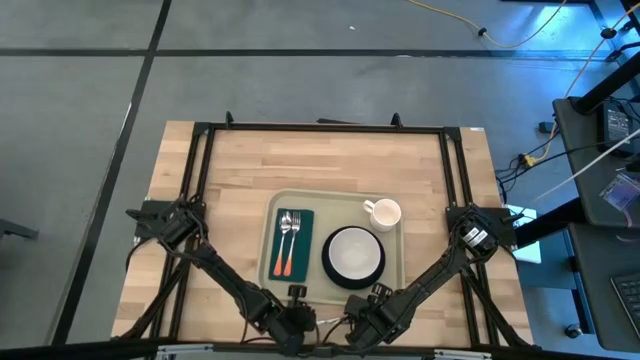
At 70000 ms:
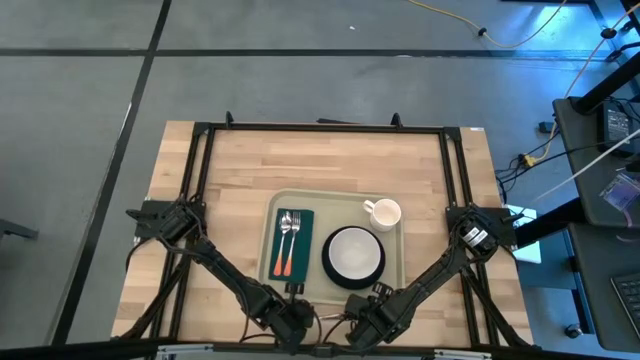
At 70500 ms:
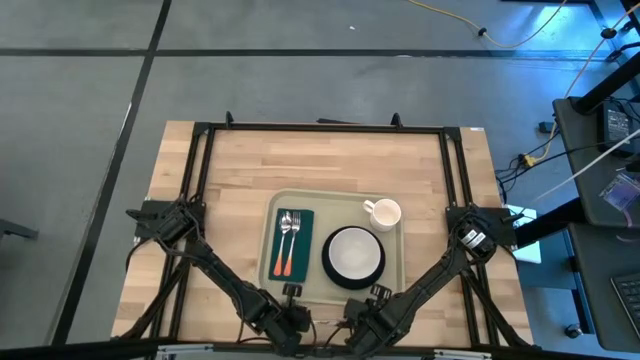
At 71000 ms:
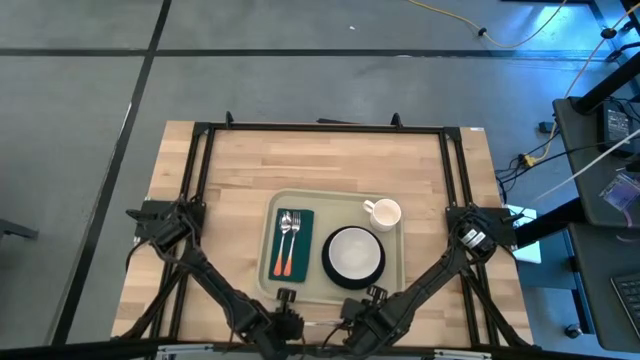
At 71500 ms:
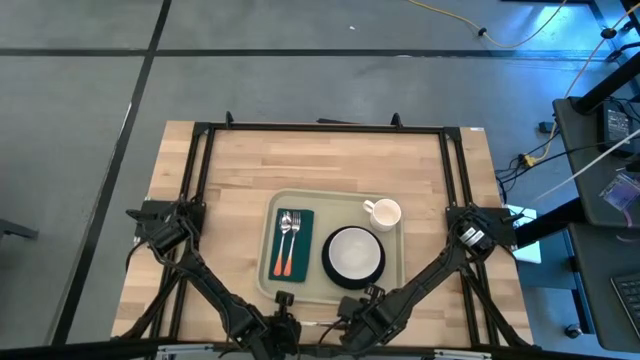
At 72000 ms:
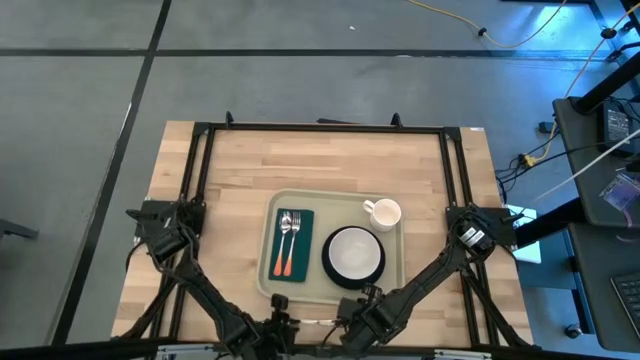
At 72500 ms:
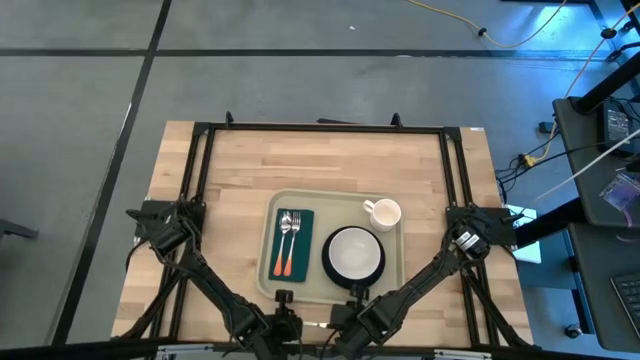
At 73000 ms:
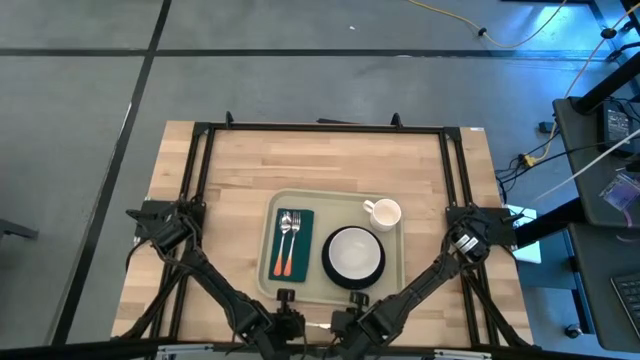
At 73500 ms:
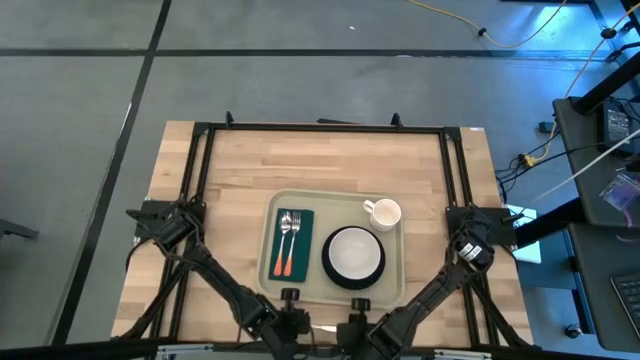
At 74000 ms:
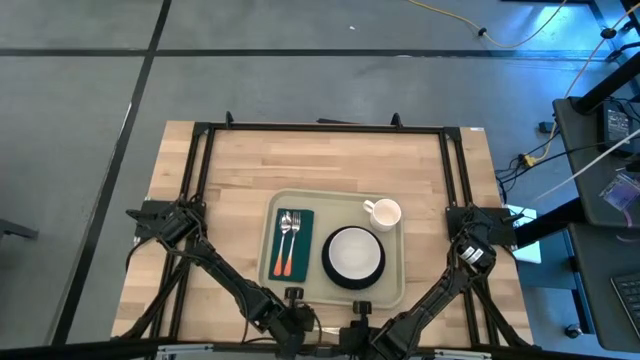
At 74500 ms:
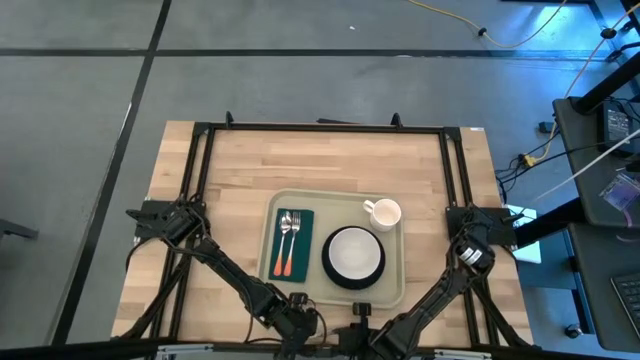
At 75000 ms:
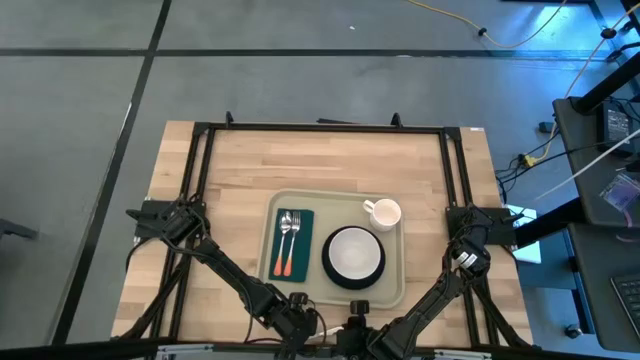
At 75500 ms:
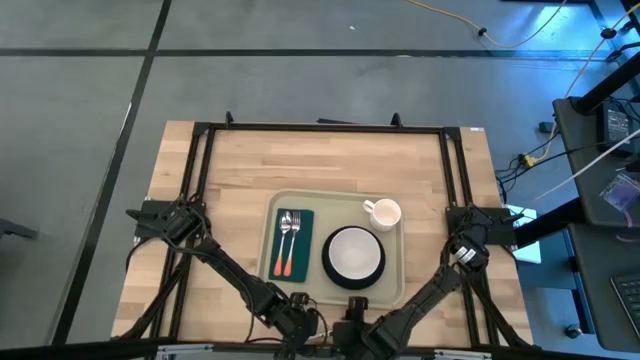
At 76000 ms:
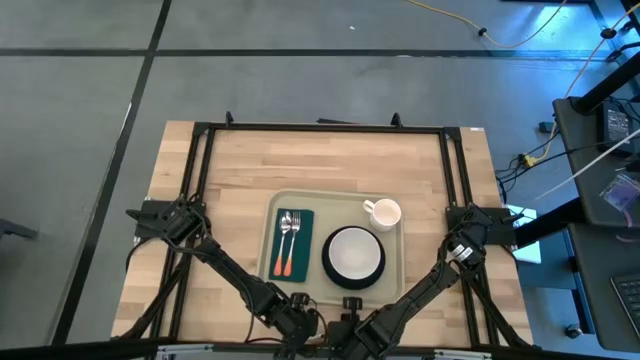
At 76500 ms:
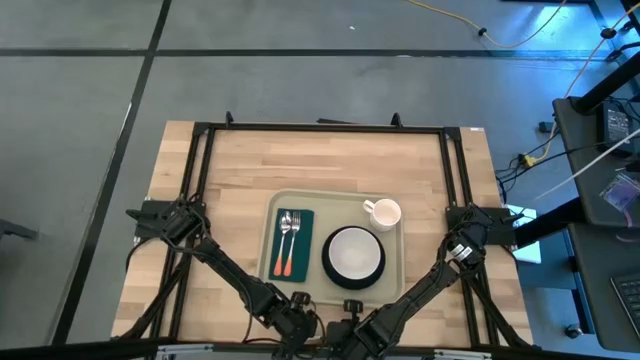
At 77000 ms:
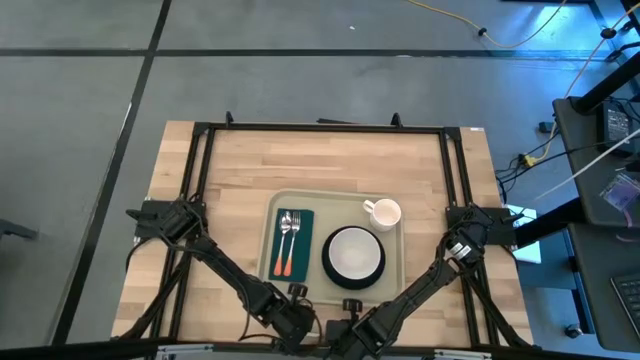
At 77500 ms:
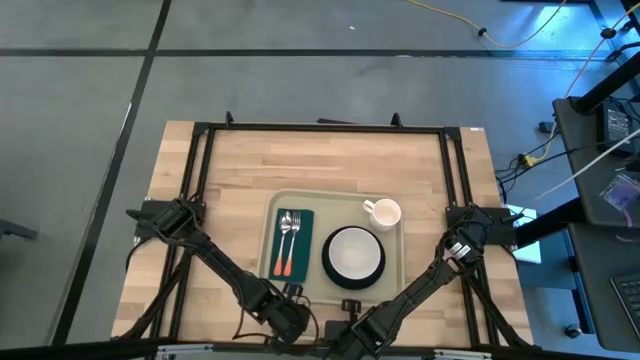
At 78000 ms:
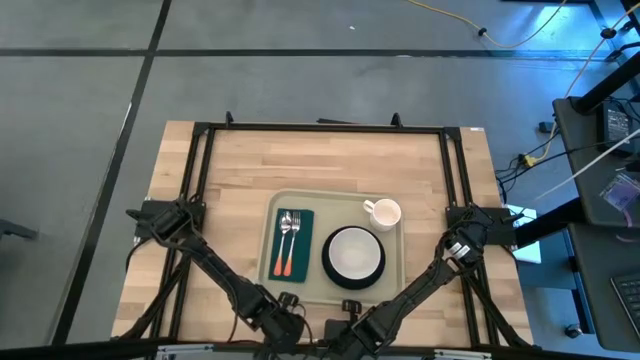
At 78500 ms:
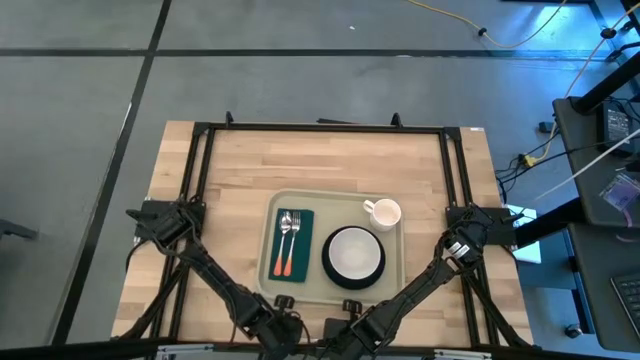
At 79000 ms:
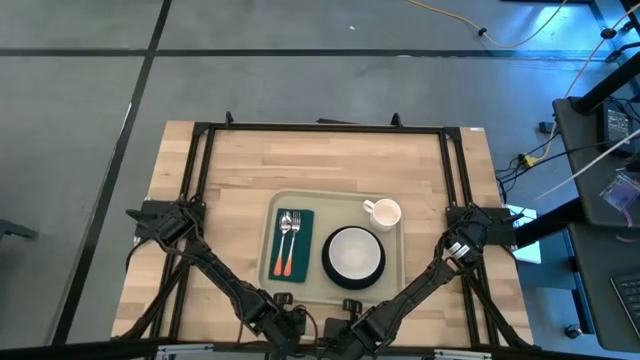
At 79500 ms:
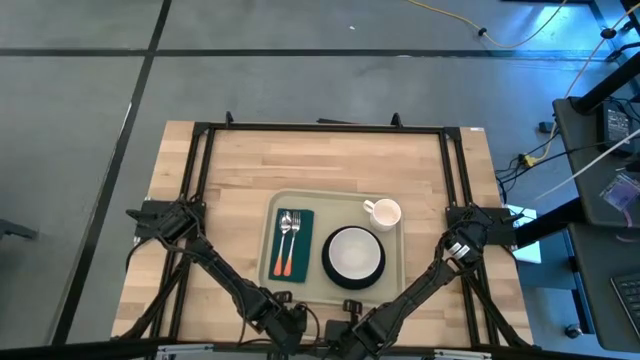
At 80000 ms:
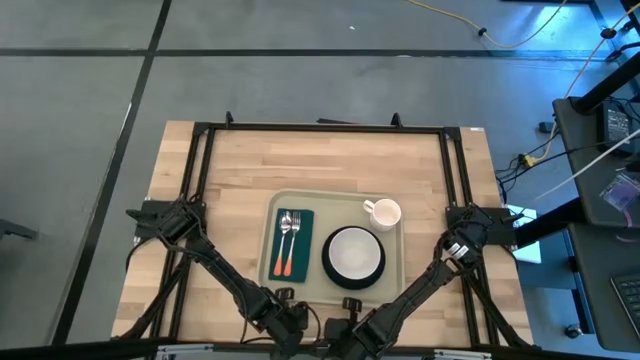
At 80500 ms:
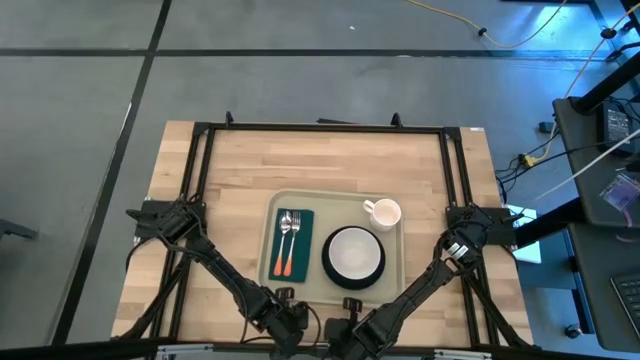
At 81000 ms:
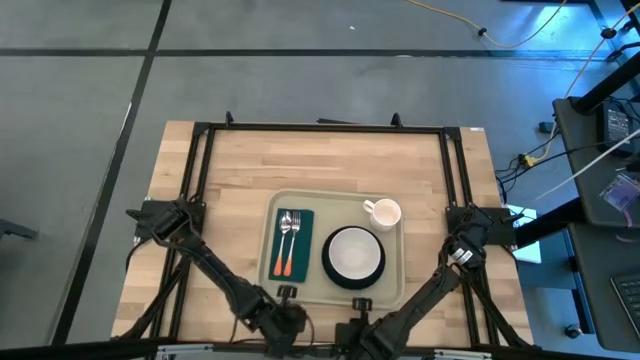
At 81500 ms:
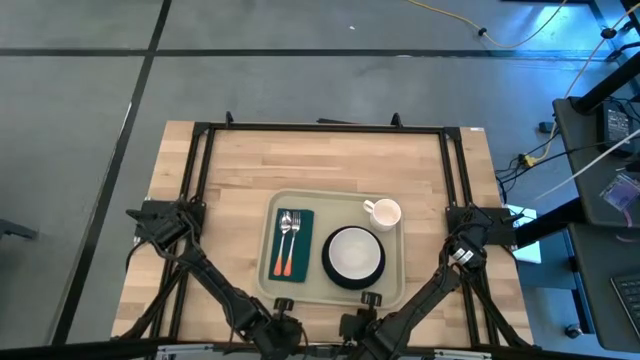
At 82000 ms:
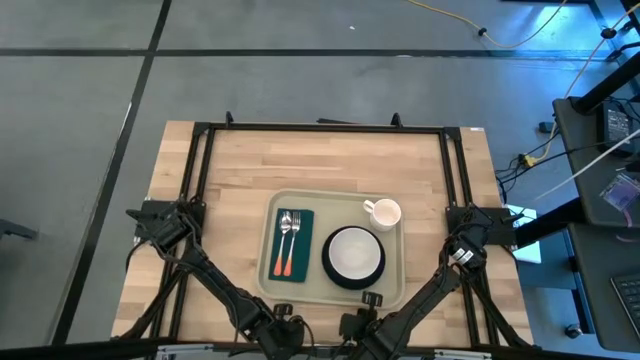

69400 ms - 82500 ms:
Task: Set up tray
Put the orange knife on the green napkin

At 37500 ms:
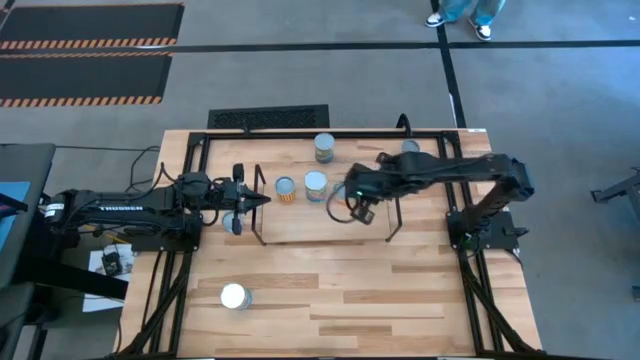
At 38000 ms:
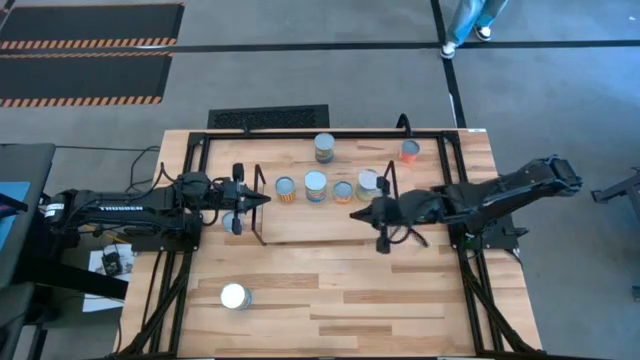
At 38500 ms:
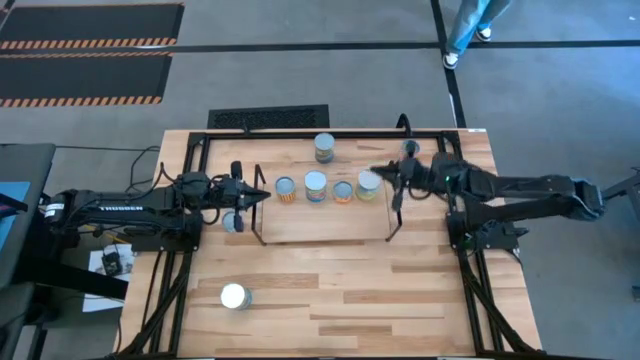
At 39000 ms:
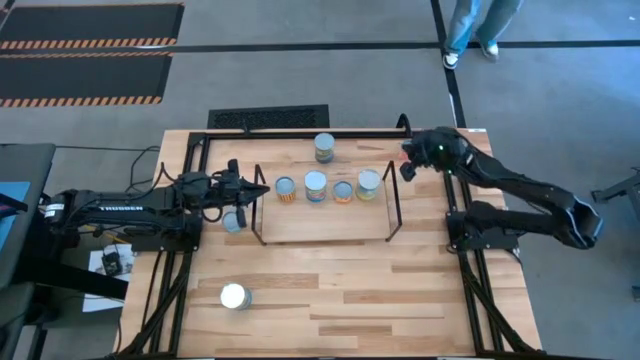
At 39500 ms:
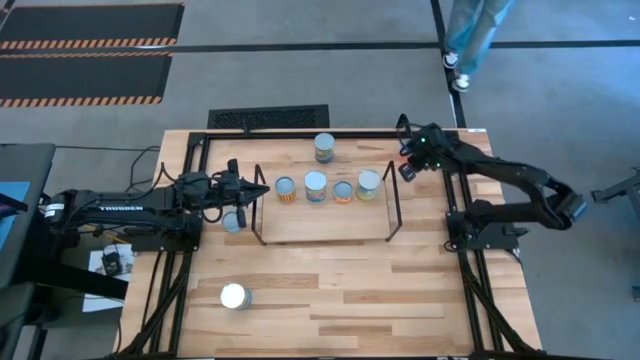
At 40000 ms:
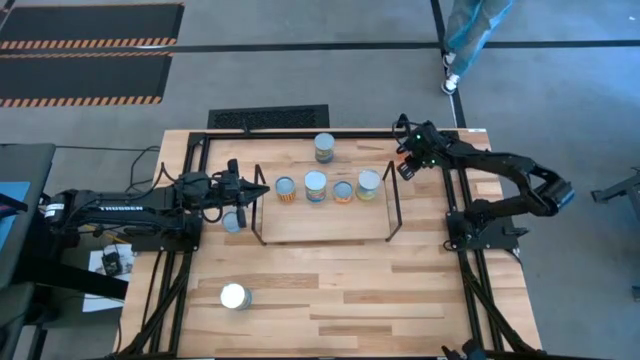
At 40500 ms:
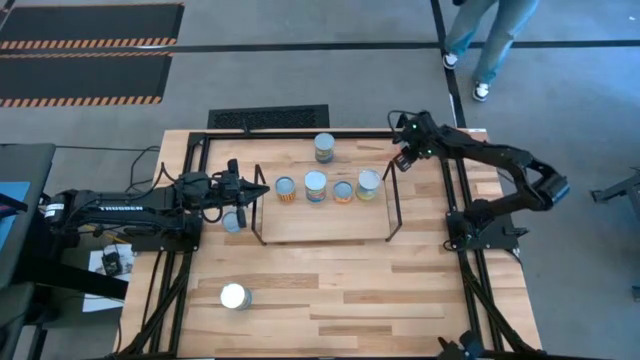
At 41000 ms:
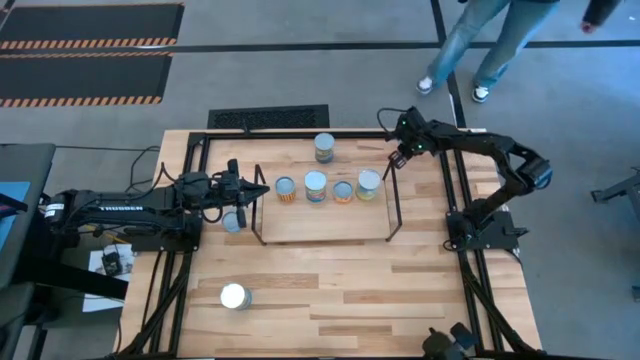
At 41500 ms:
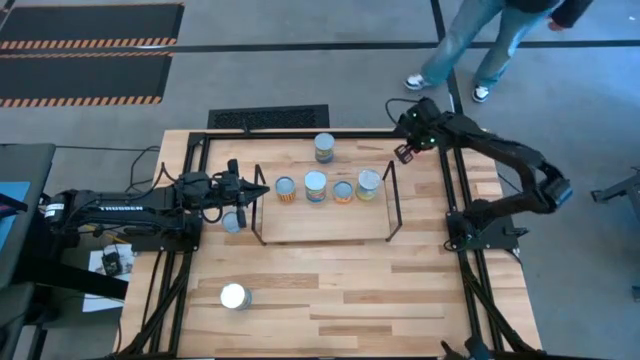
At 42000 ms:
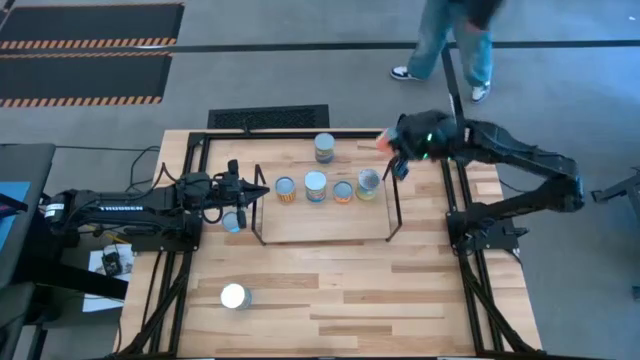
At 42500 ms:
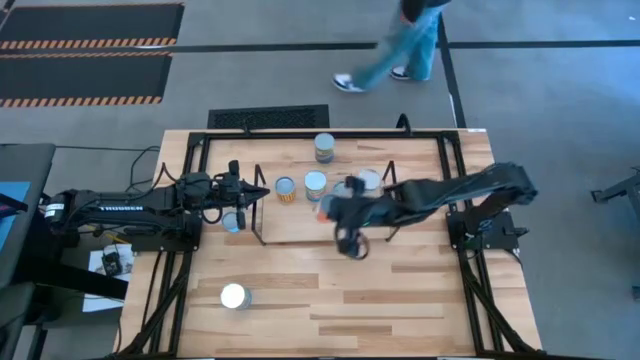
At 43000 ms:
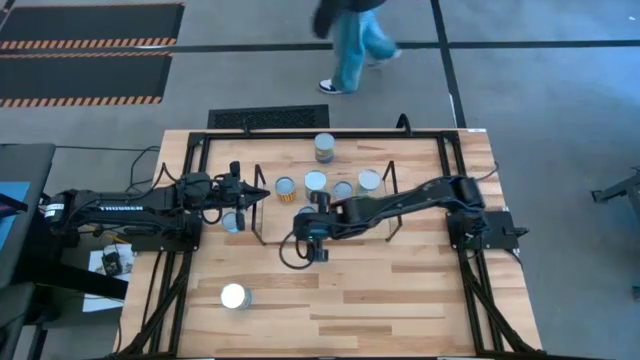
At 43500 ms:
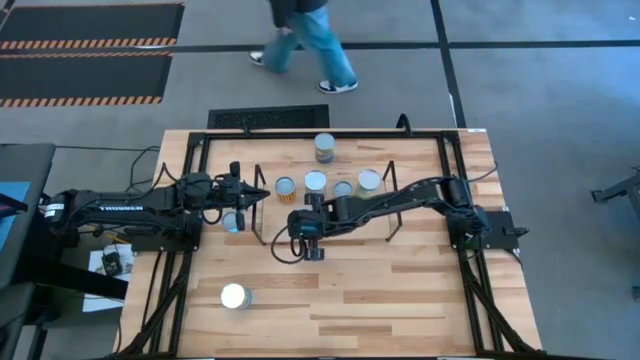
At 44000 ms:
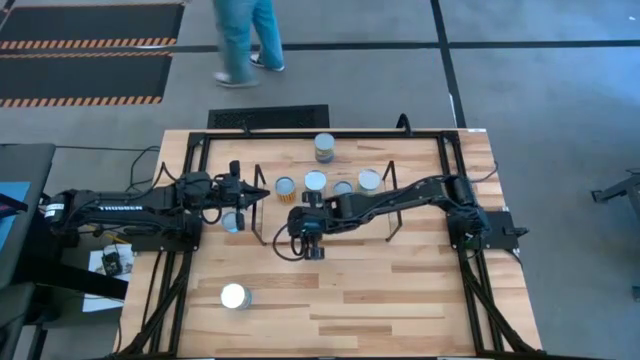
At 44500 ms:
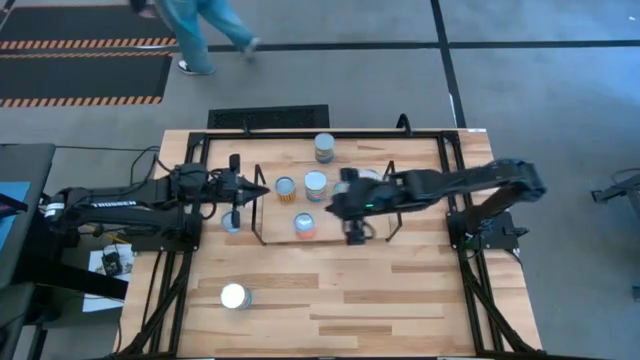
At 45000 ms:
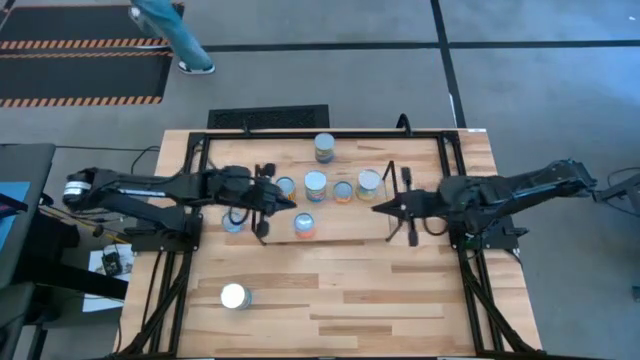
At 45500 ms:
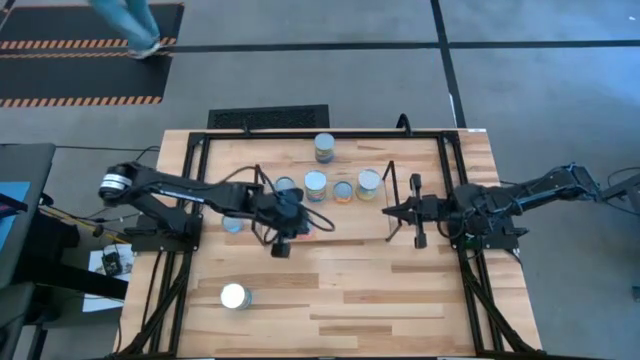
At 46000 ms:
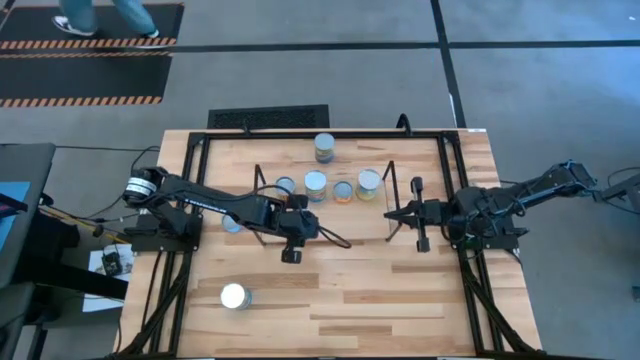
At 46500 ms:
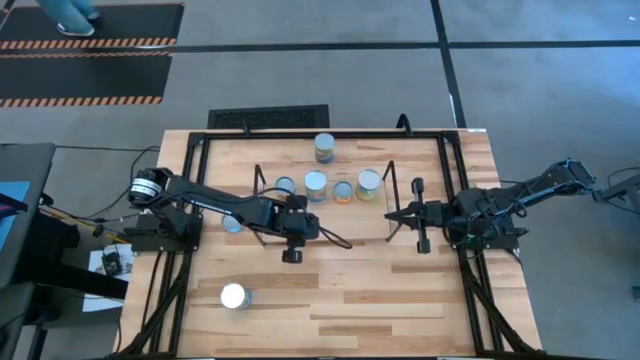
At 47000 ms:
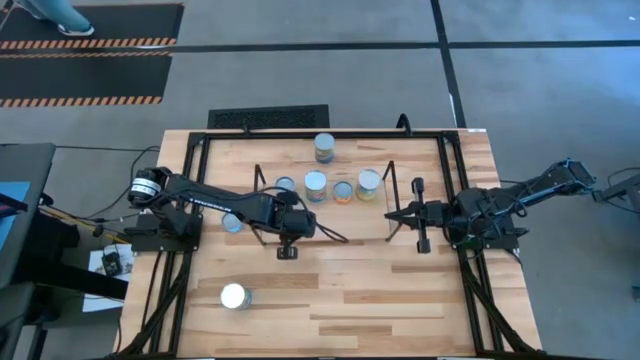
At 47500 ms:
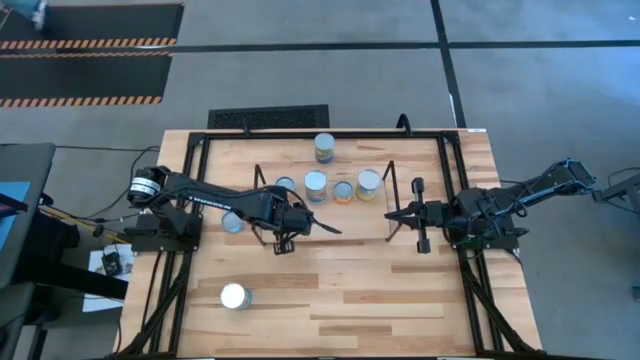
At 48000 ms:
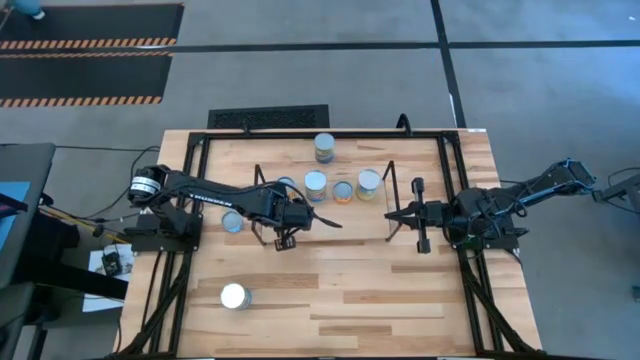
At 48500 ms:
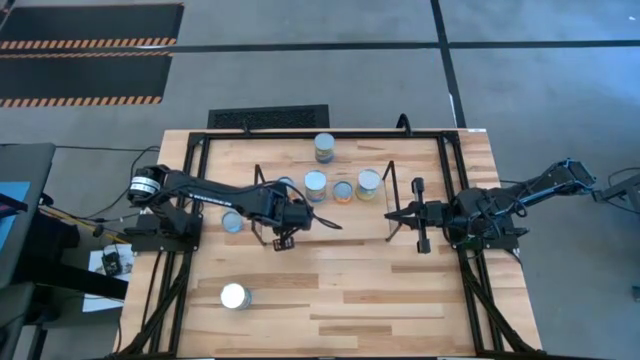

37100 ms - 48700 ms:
Task: Pick and place cans onto a shelf
Put the orange can on the shelf aligned with the black beans can
